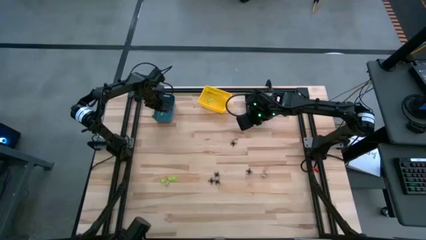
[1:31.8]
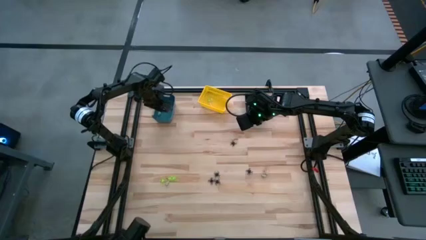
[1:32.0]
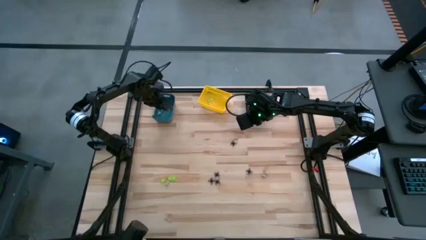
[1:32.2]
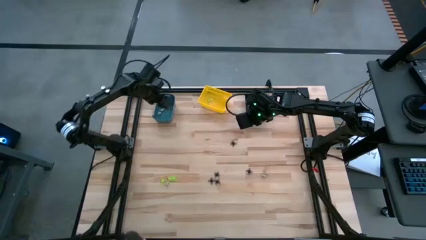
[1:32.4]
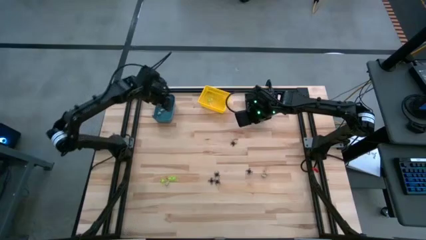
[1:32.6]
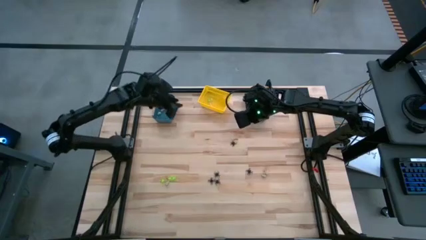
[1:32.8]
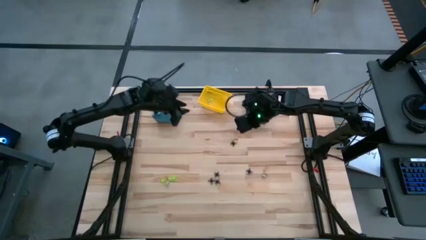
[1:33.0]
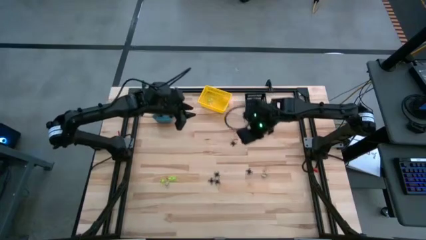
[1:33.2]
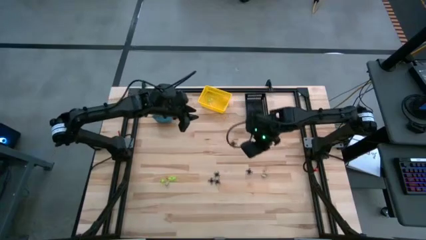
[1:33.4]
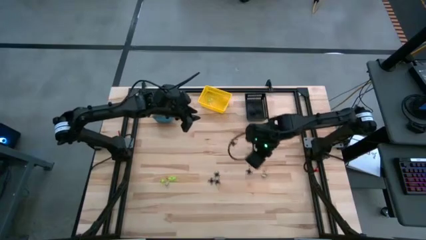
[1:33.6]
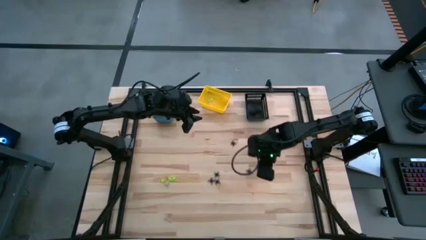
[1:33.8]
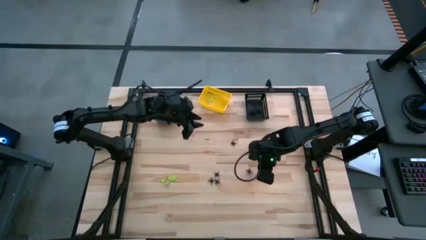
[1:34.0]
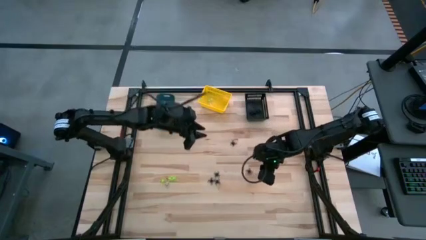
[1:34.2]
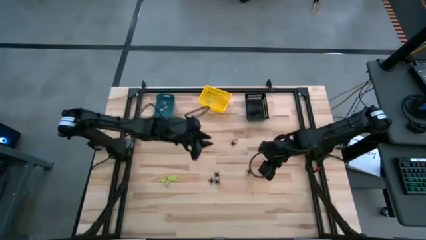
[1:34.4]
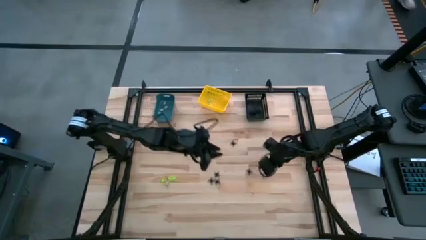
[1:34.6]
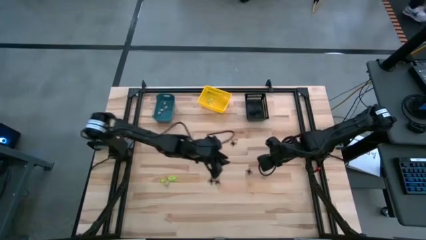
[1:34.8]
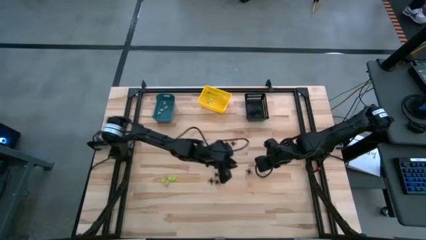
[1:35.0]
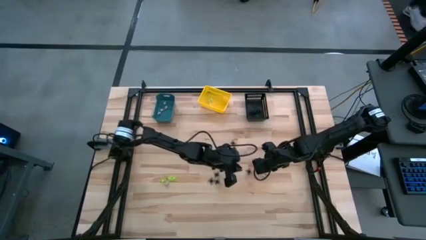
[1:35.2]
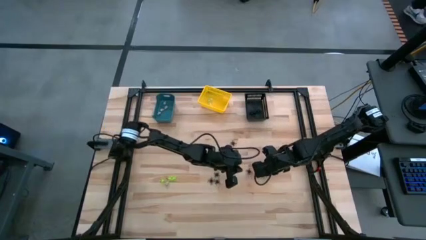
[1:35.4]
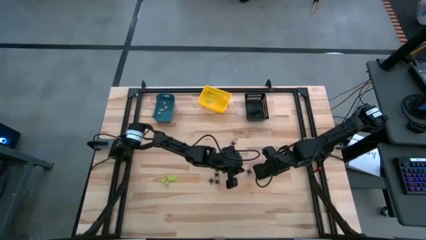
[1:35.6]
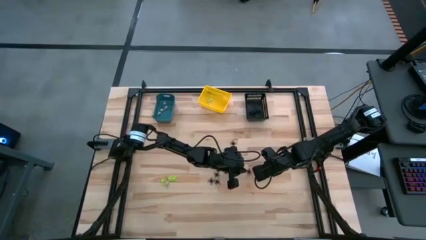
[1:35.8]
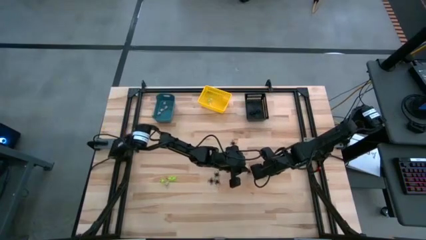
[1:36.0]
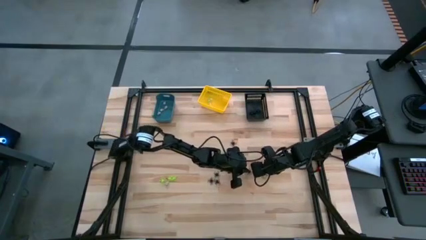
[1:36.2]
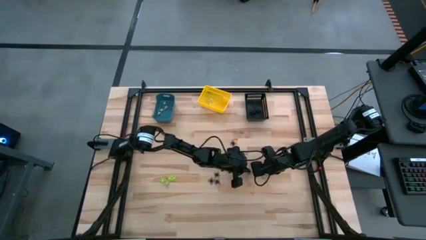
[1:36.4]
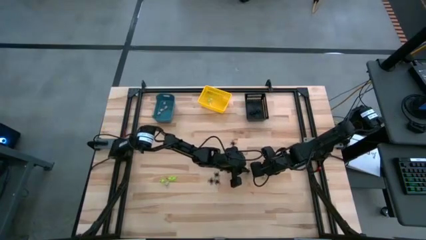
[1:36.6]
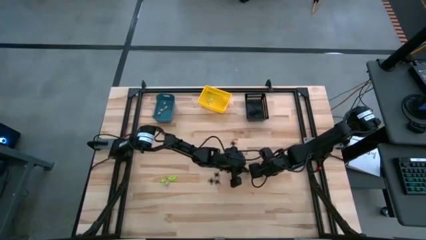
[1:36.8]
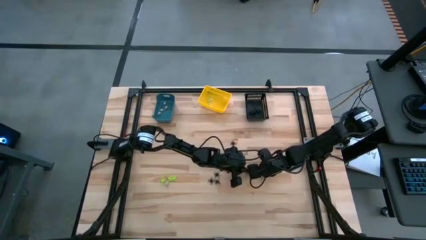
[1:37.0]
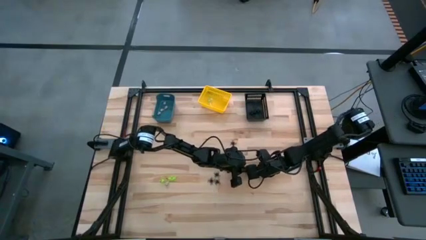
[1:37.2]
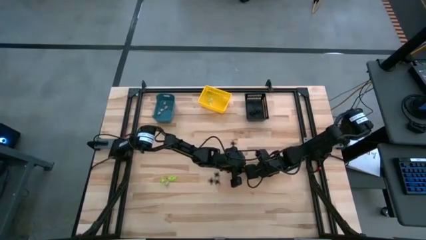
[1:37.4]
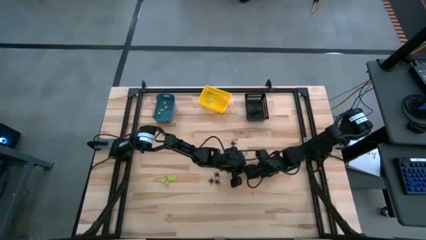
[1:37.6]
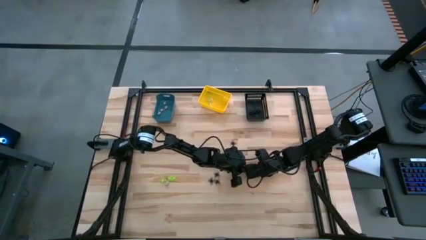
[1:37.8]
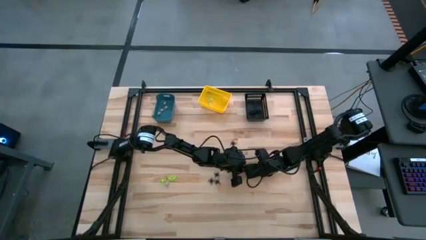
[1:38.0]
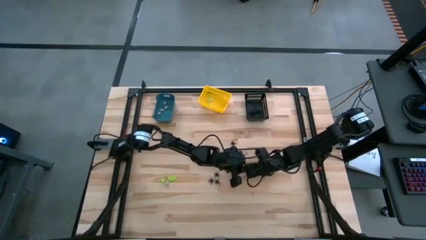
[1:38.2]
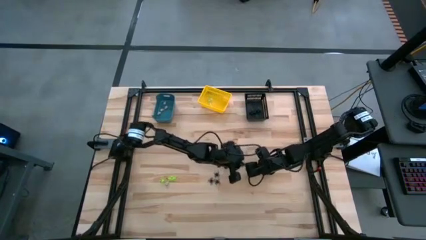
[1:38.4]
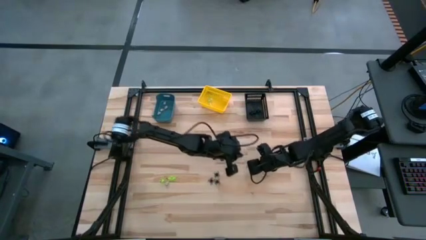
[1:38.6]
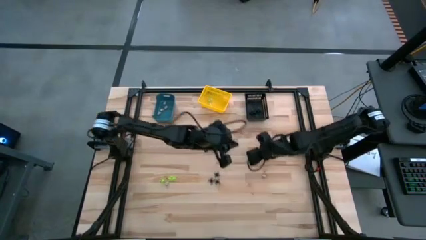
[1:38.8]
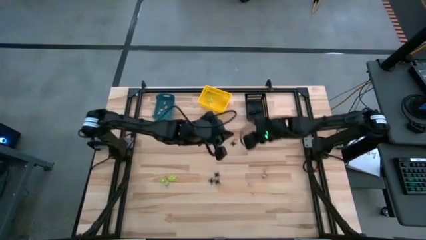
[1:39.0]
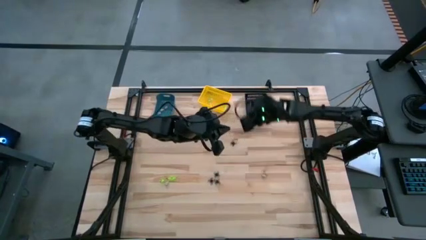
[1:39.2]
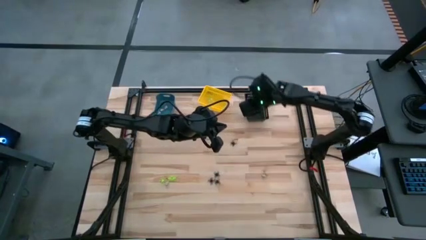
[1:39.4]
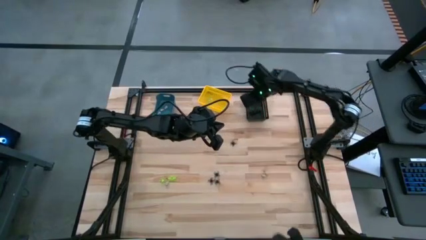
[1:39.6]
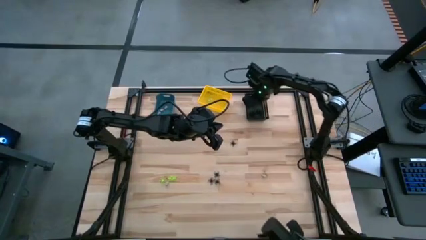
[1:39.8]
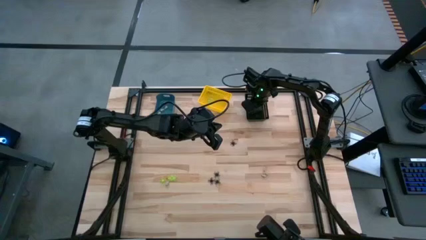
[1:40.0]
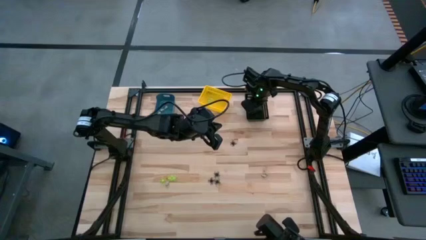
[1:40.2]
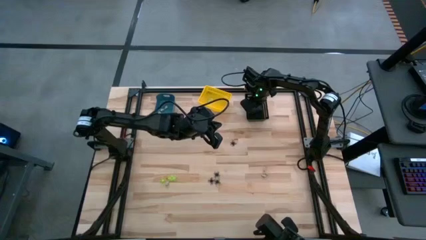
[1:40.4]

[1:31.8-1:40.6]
Task: Sort Halloween decoration
Put the black spider toy into the black bin

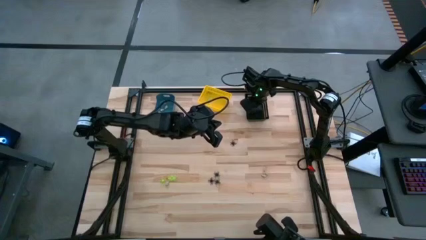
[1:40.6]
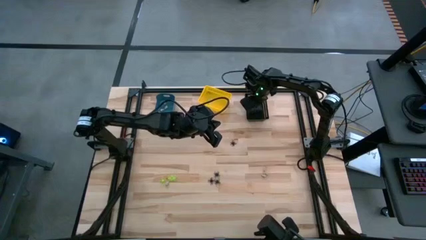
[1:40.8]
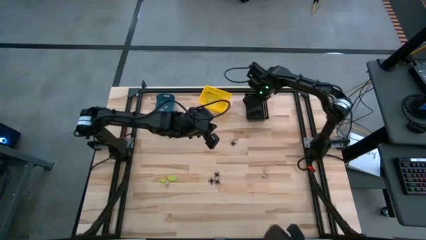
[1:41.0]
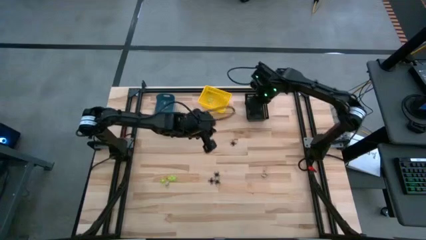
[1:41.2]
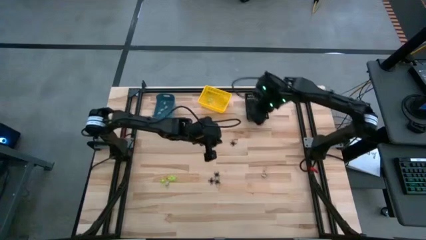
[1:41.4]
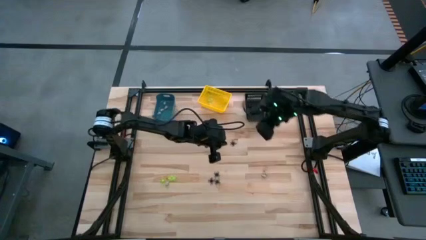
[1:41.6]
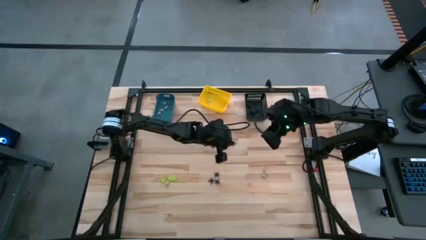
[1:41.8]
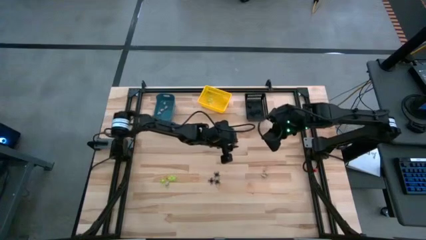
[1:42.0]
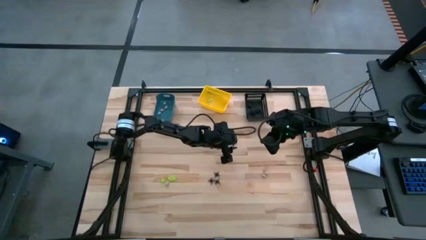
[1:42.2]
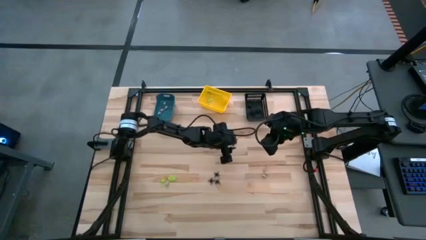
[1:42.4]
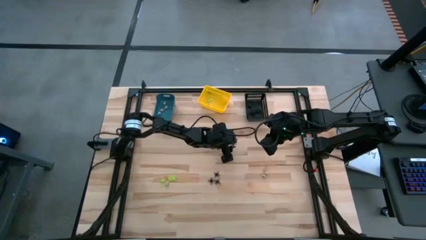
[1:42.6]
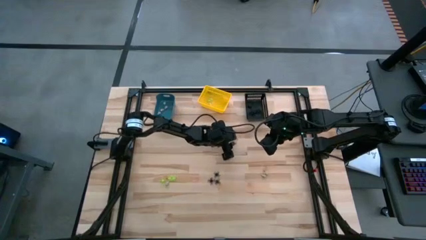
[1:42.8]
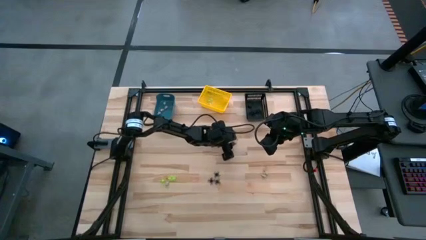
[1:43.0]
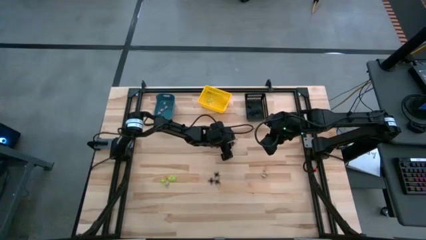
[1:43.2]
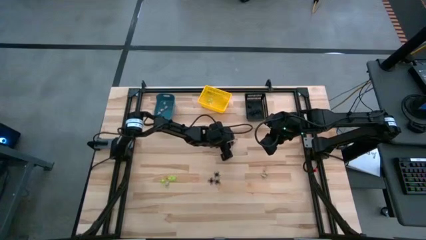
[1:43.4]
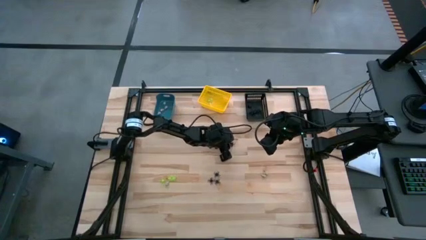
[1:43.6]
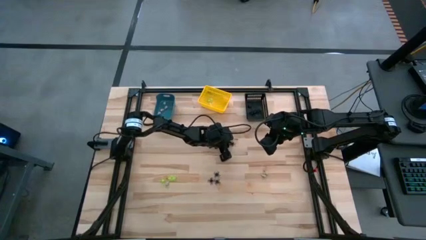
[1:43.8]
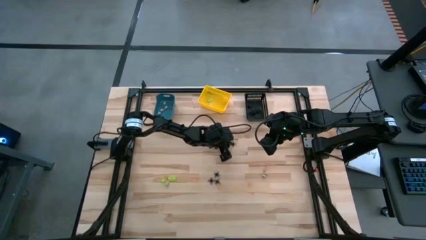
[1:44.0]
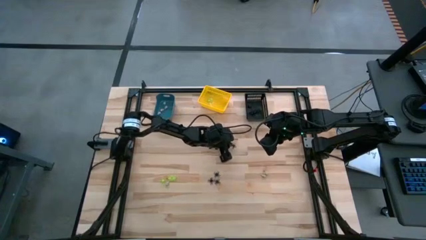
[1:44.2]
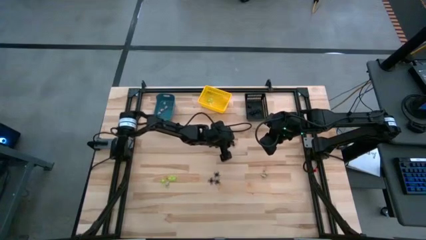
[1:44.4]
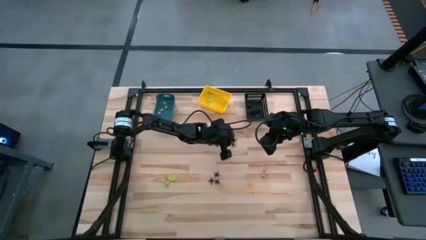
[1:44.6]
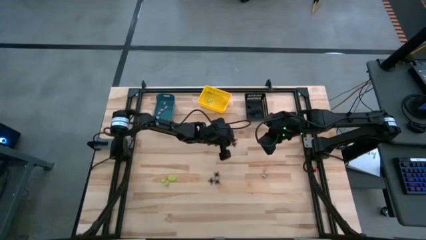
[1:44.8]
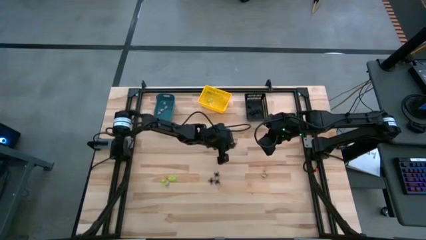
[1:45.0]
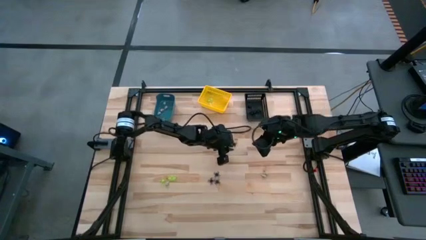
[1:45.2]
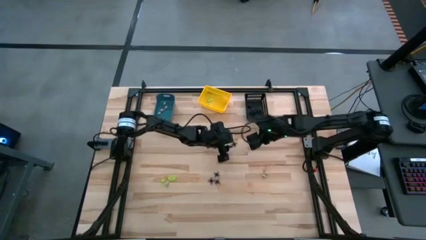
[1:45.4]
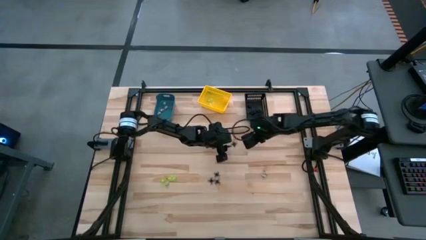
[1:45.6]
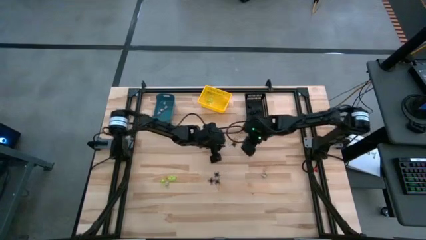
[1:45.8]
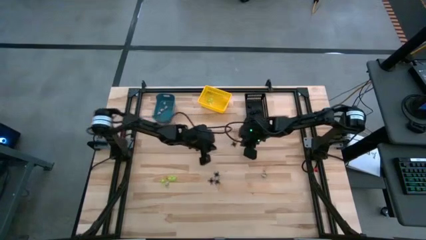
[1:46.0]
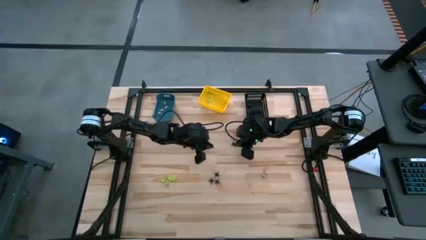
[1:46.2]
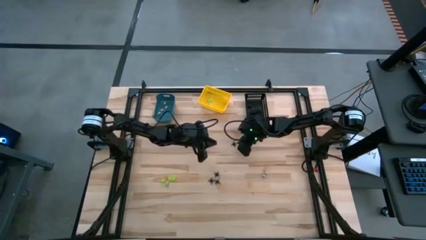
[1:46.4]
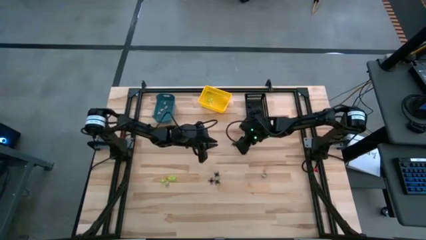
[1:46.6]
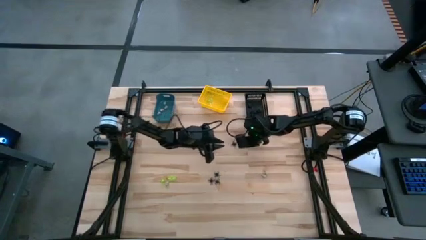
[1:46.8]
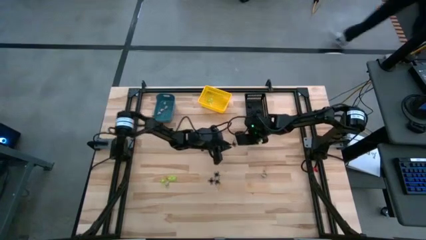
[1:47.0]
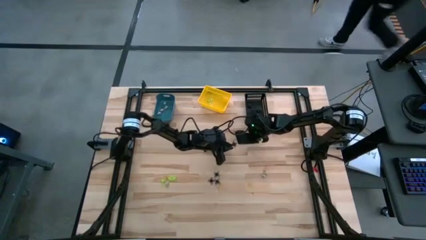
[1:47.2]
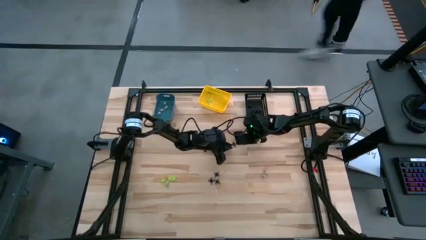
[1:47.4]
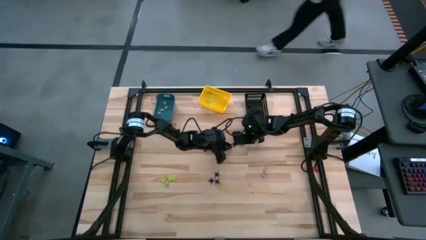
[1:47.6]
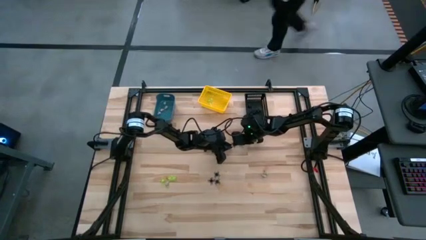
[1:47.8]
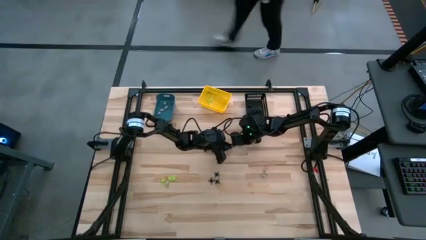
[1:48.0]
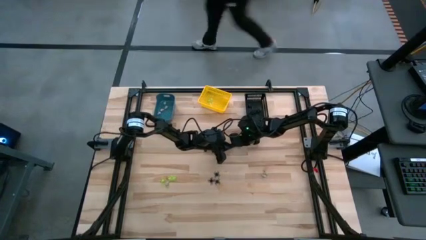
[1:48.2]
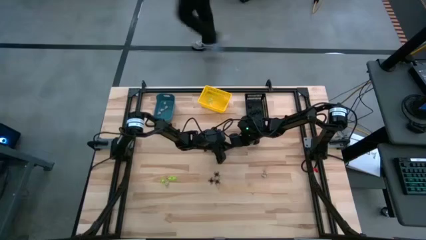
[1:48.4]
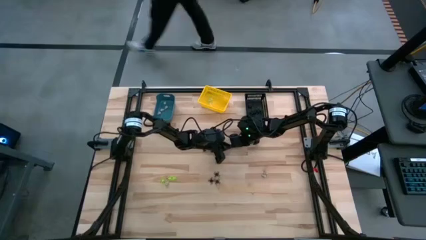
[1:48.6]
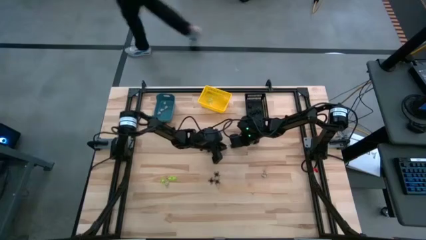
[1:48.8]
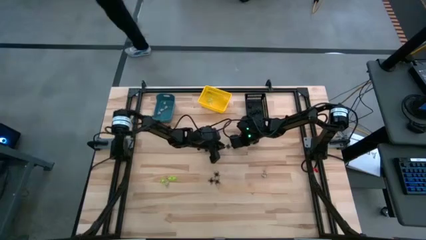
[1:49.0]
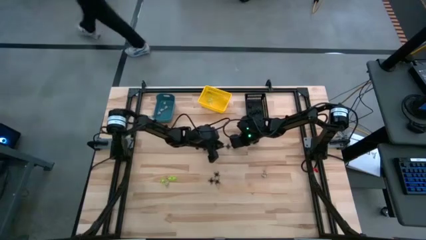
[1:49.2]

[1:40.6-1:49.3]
Put the black spider toy into the black bin
